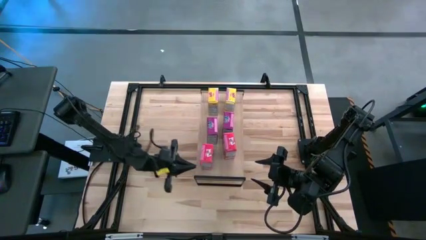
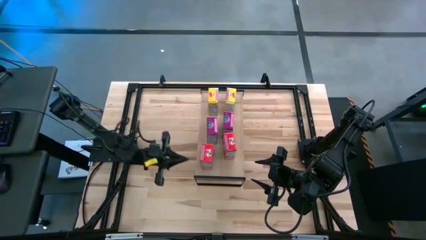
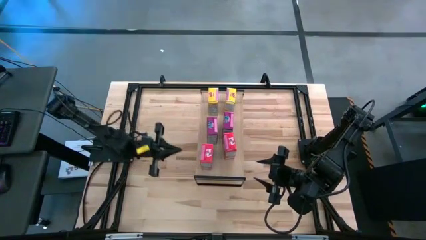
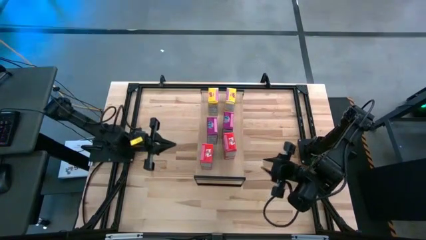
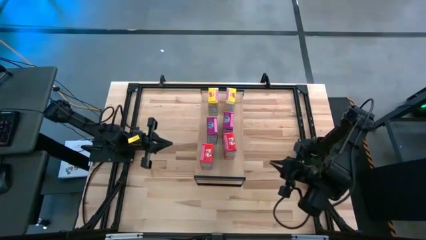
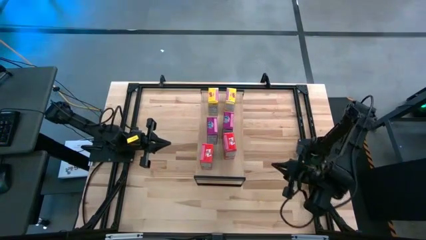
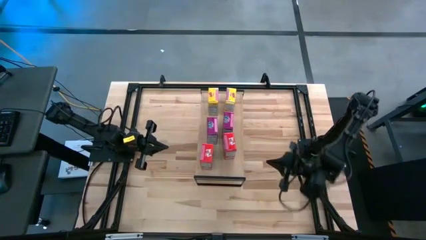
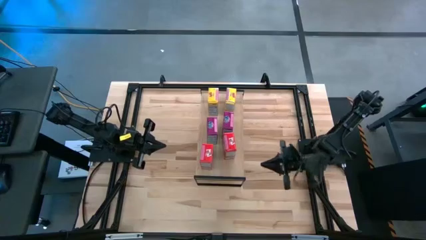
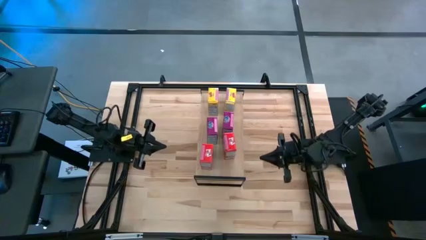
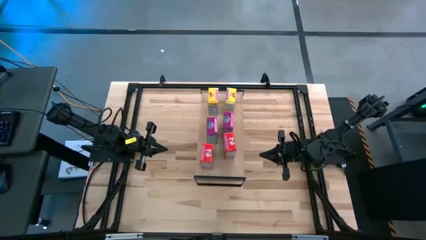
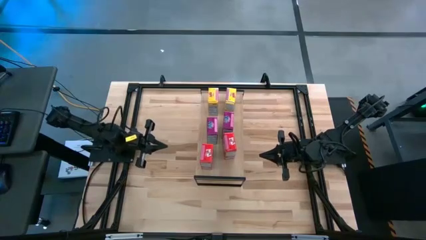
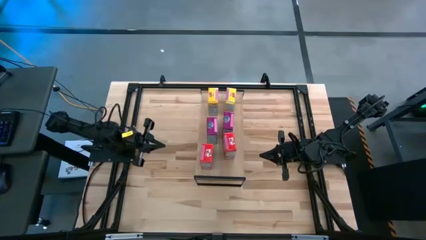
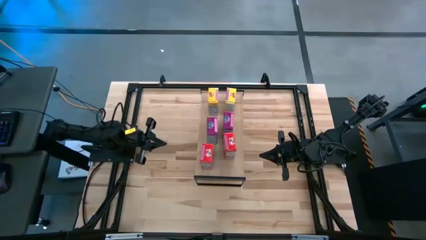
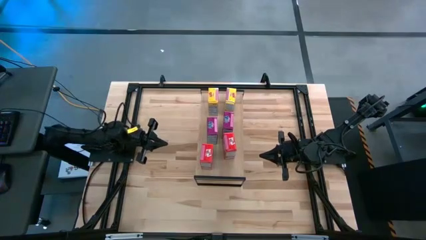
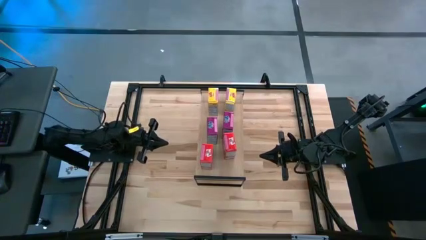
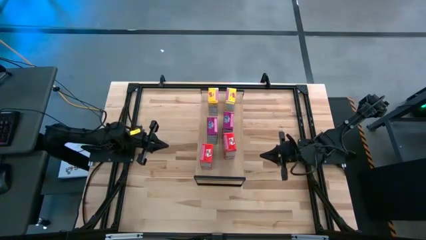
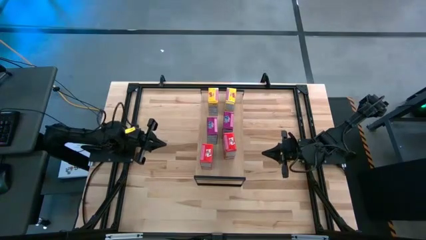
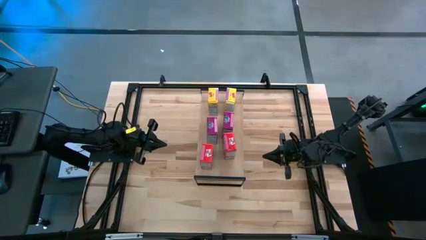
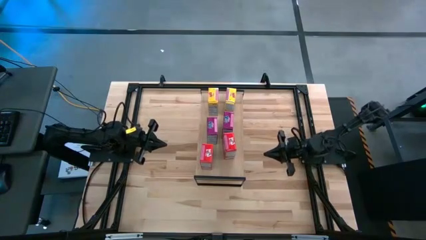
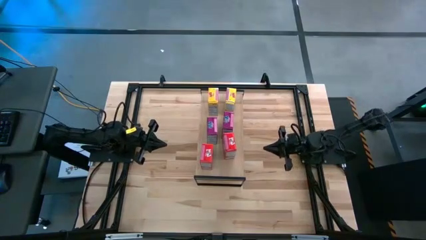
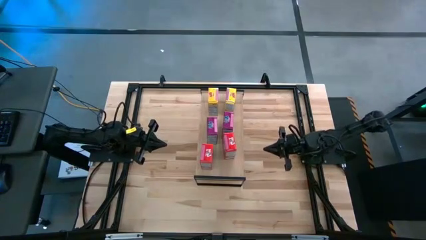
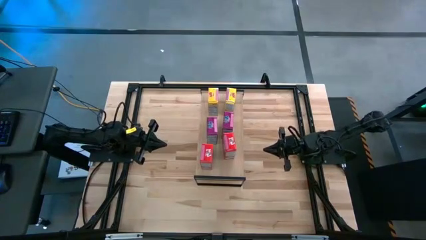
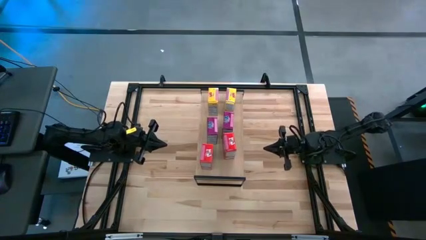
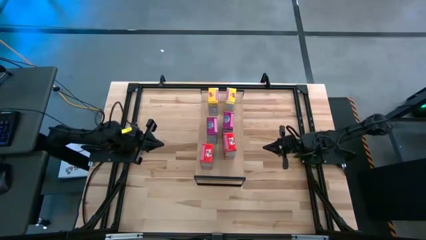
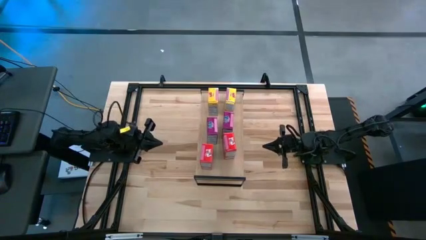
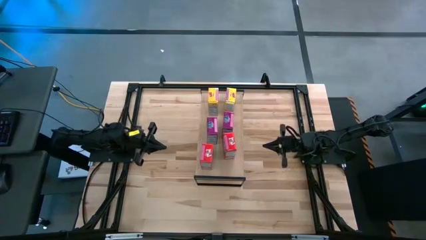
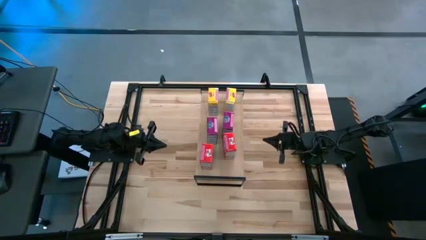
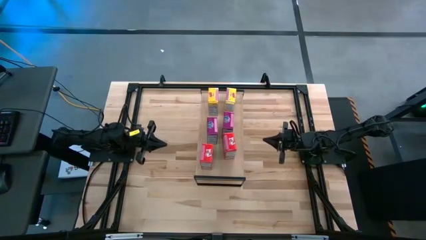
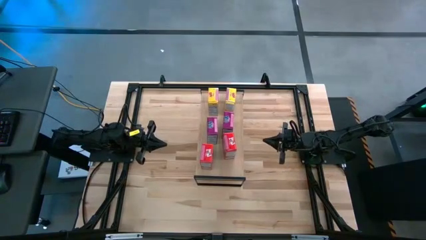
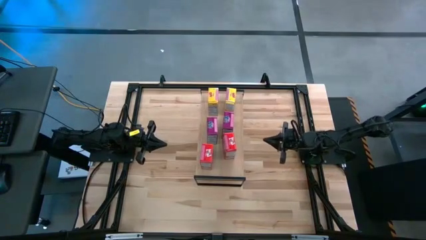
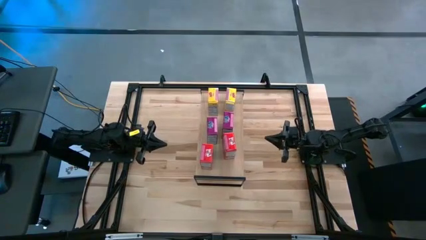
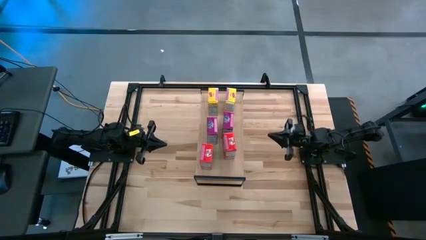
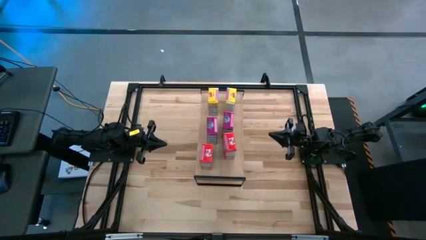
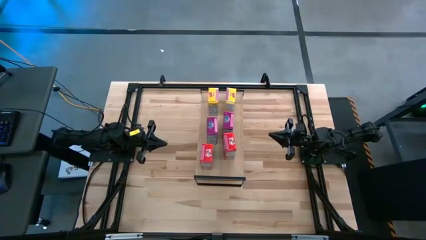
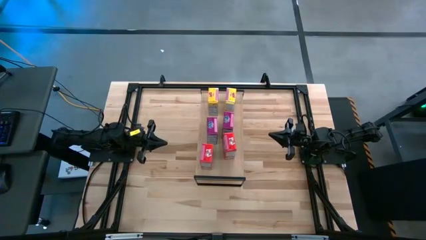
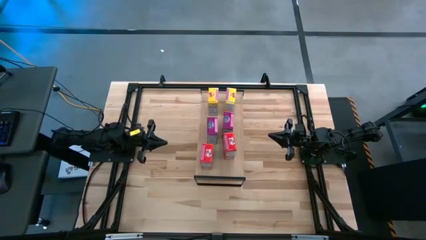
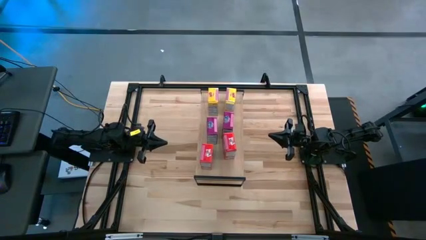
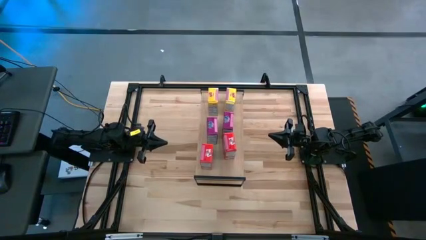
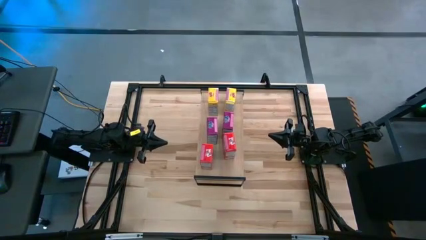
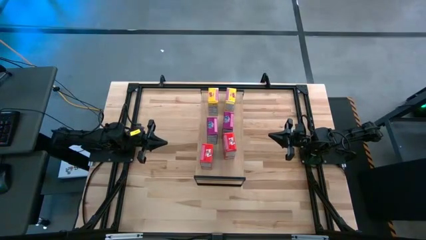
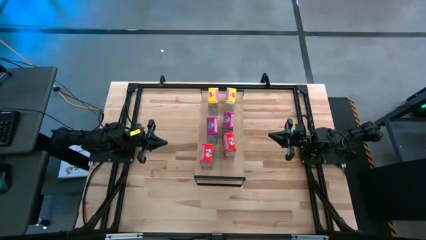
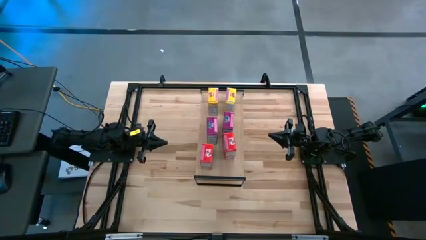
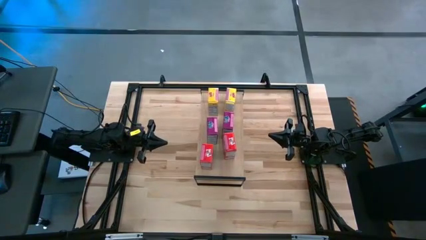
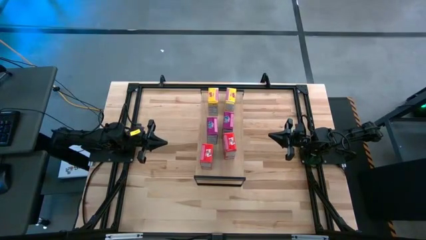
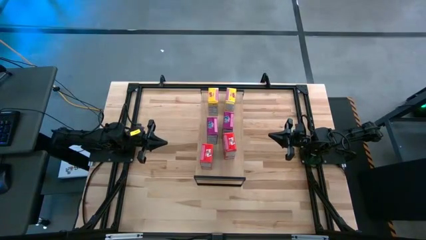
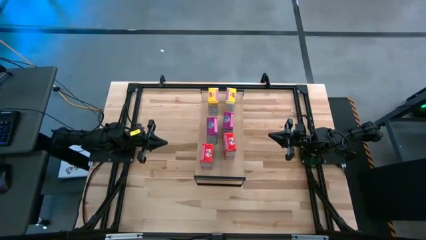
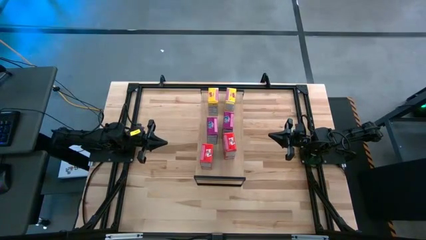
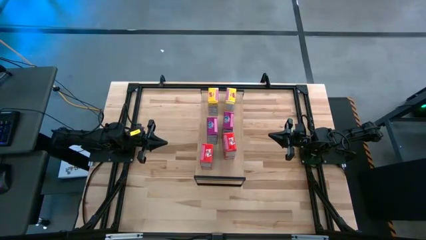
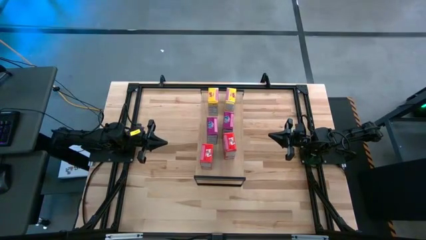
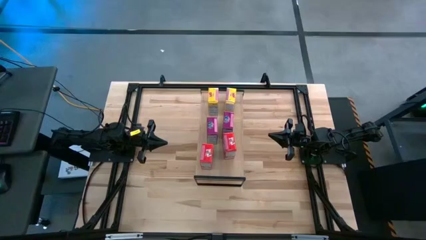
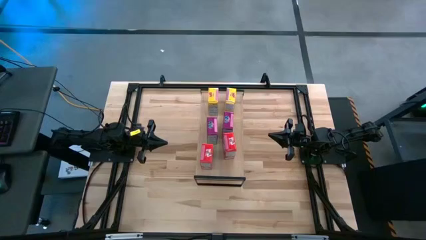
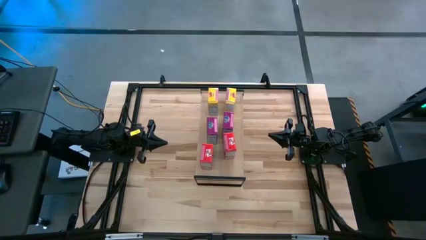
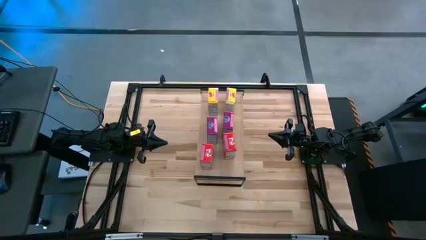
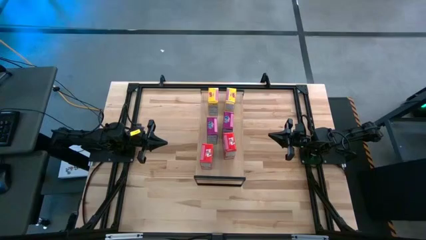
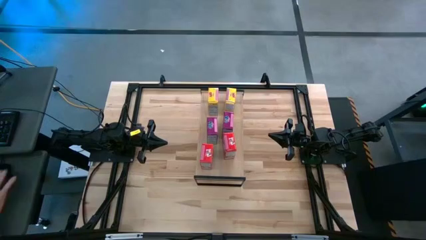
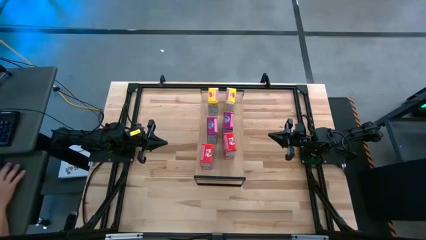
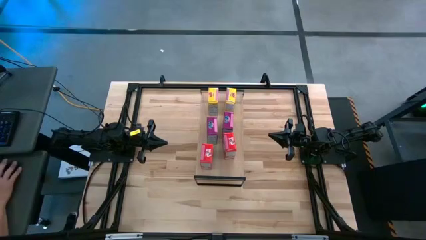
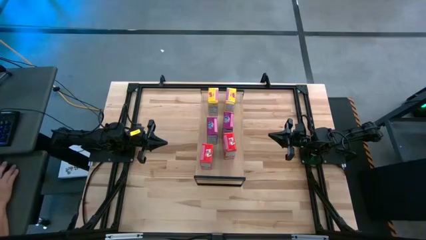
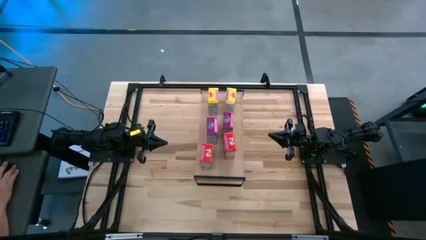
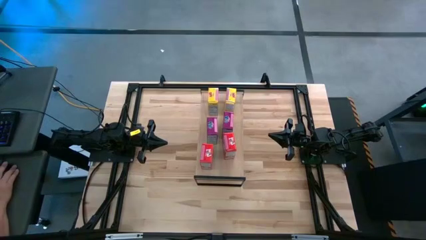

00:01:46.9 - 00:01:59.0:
Task: Stack cereal on shelf
Return to Home Position

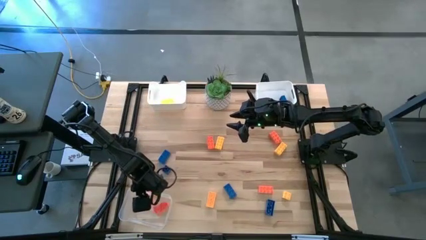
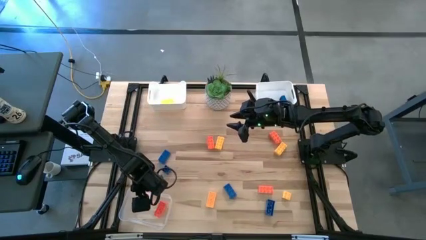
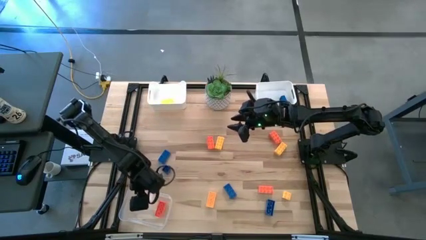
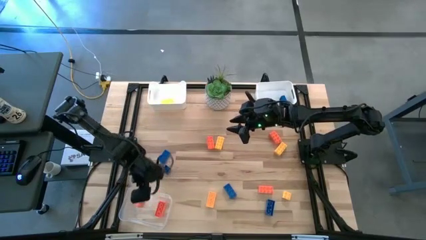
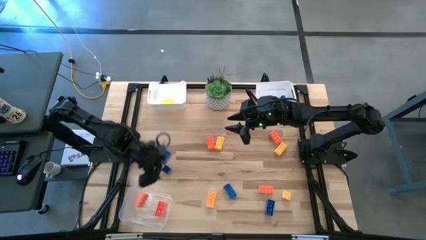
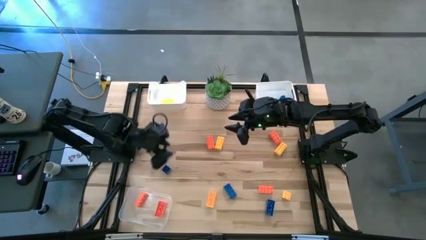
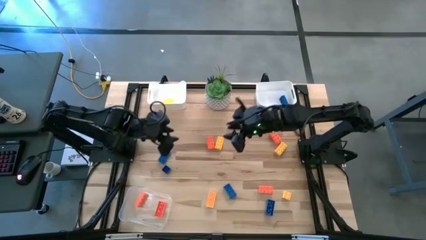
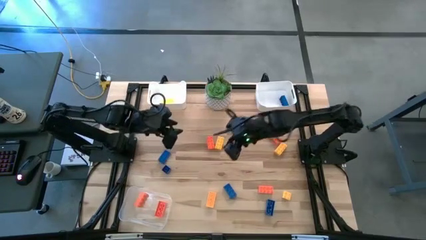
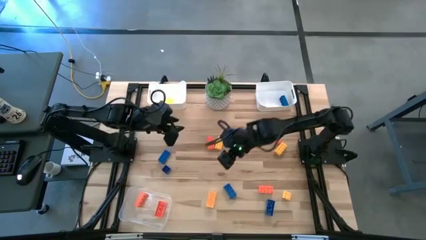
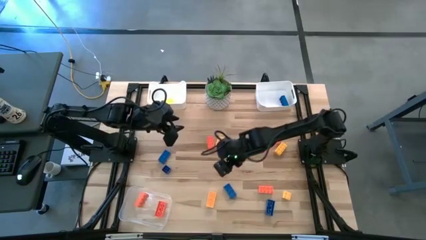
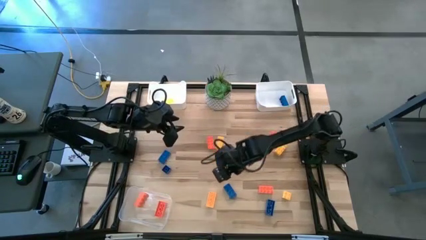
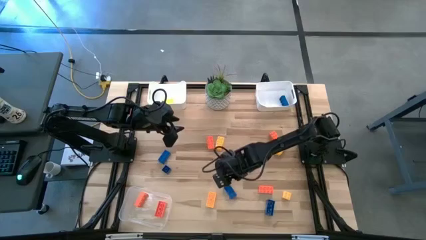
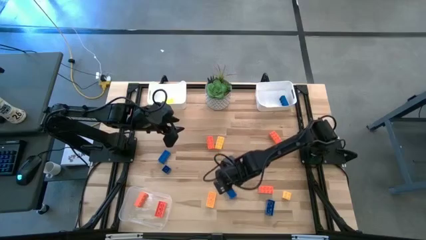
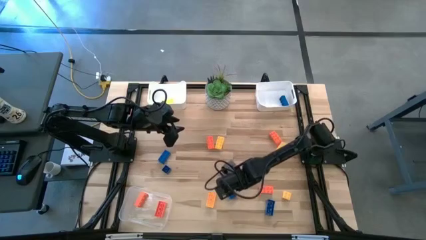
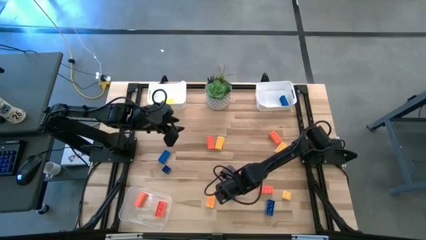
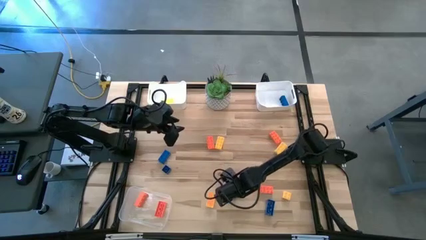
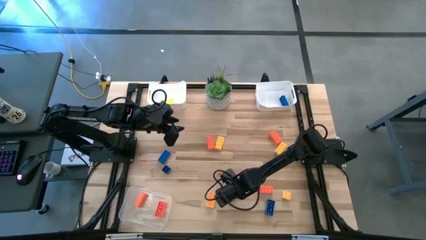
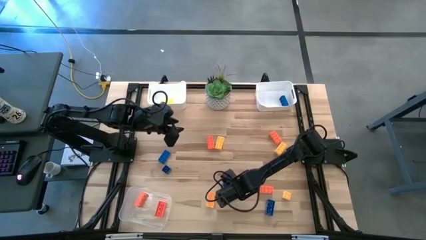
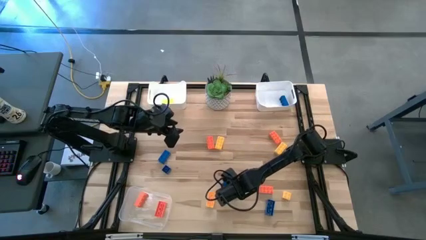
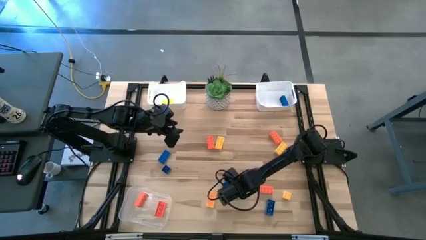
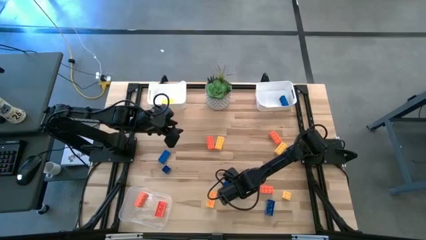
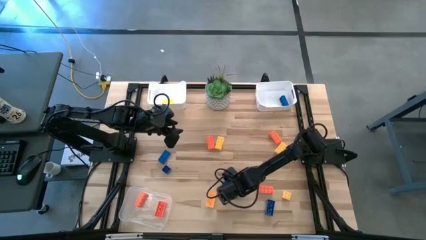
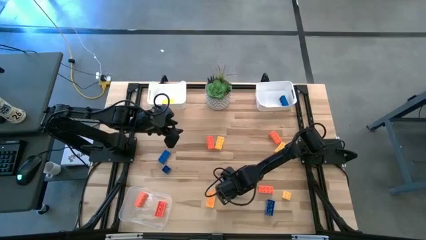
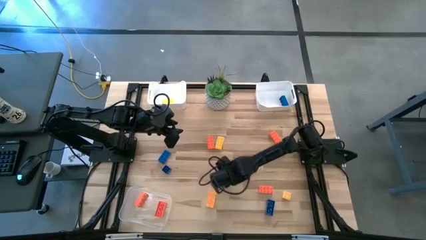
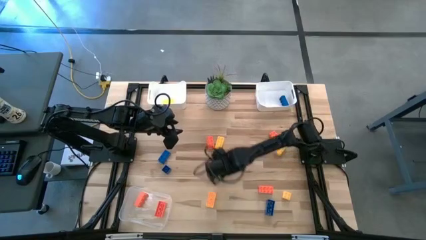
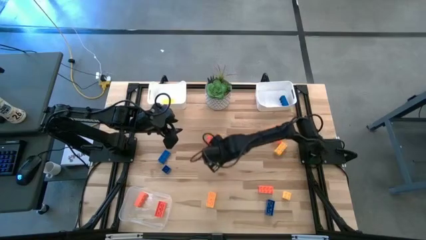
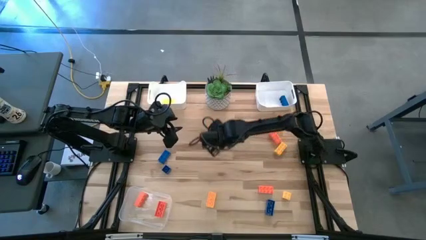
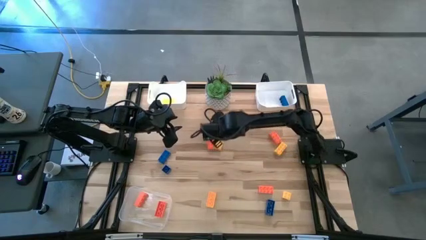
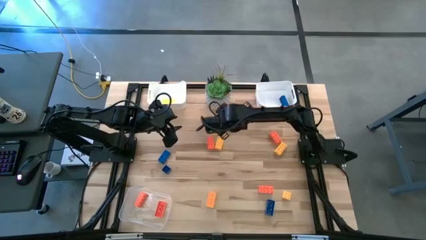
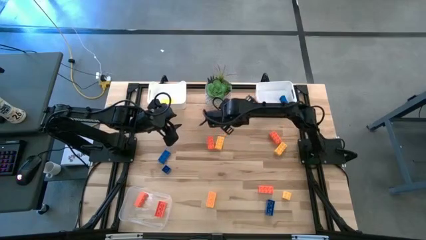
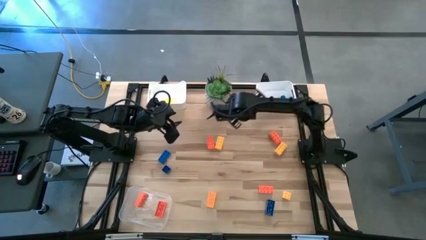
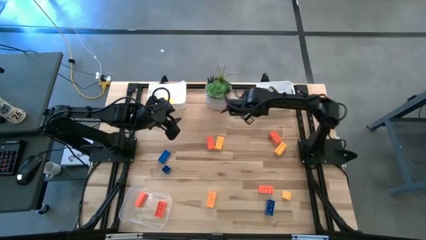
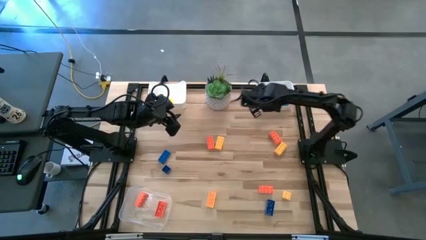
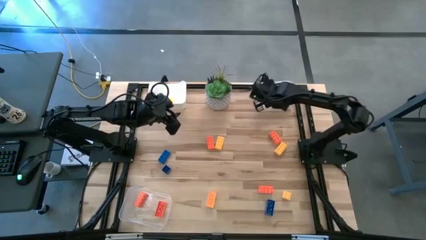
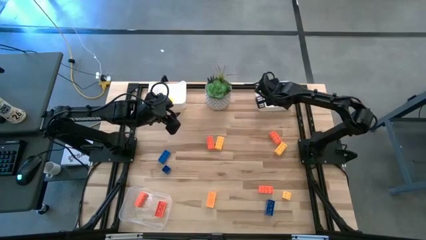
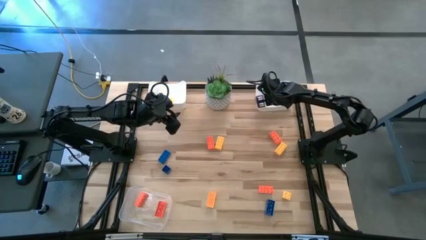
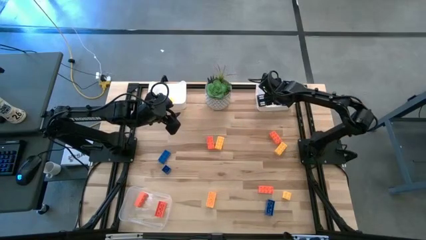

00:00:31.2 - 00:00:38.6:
Task: Sort & place blocks by color
Put the blue game piece into the right white bin
